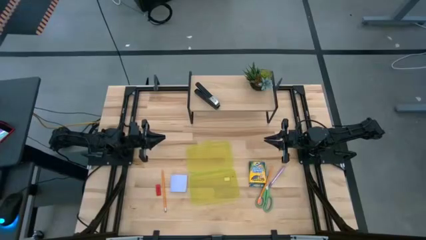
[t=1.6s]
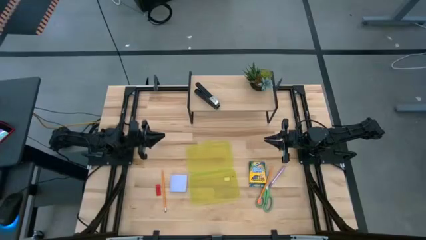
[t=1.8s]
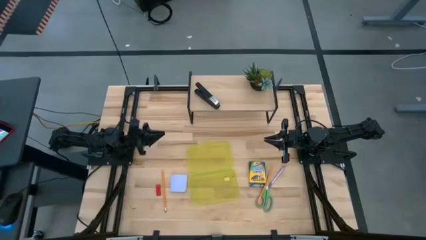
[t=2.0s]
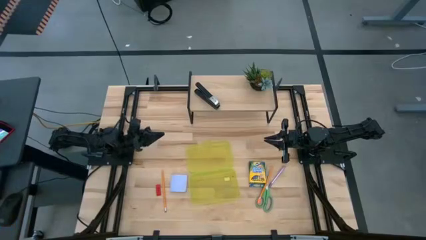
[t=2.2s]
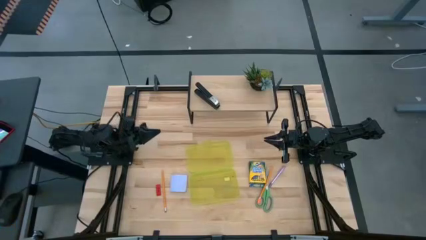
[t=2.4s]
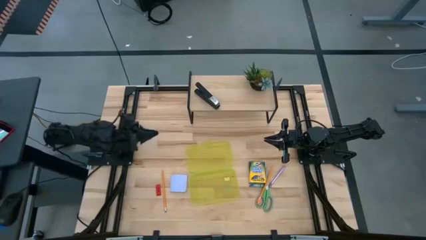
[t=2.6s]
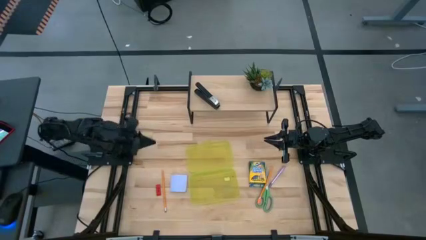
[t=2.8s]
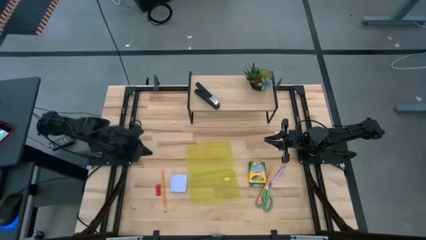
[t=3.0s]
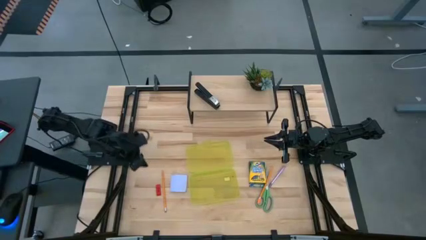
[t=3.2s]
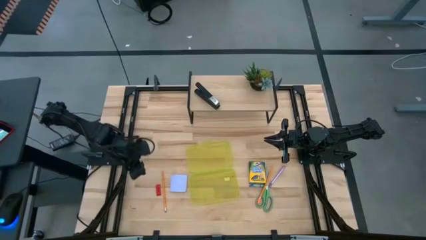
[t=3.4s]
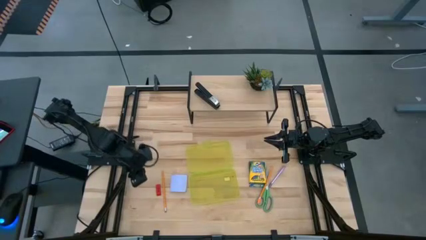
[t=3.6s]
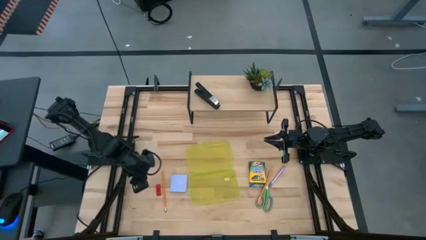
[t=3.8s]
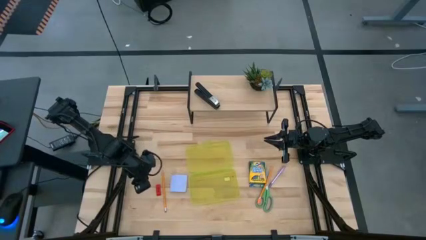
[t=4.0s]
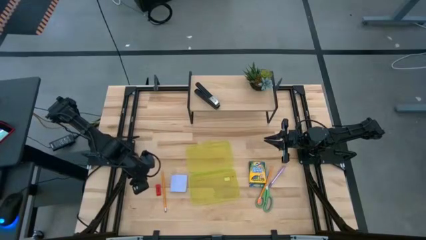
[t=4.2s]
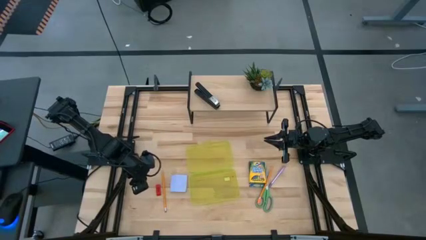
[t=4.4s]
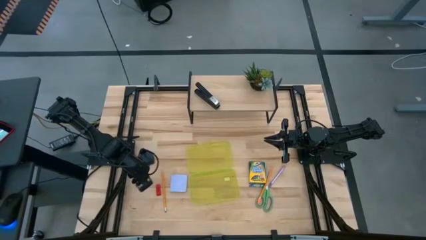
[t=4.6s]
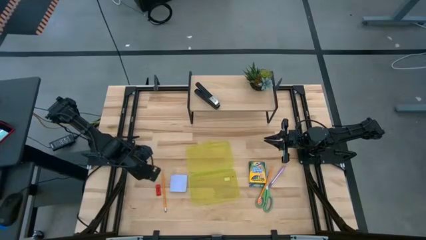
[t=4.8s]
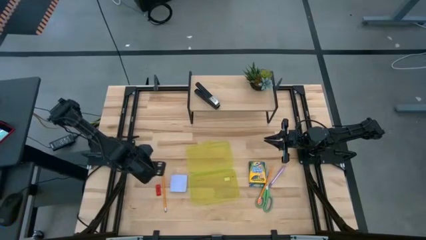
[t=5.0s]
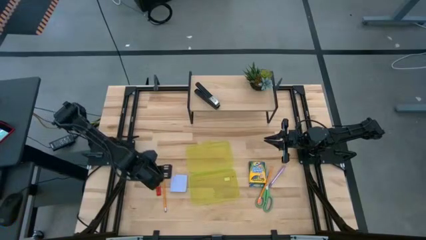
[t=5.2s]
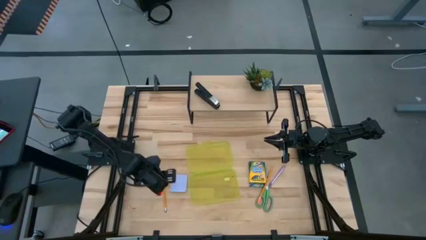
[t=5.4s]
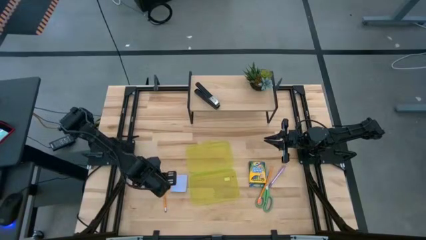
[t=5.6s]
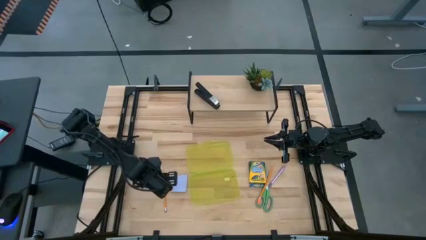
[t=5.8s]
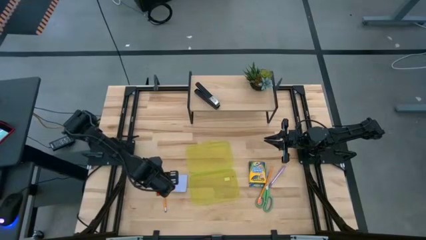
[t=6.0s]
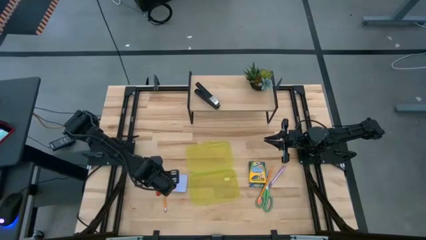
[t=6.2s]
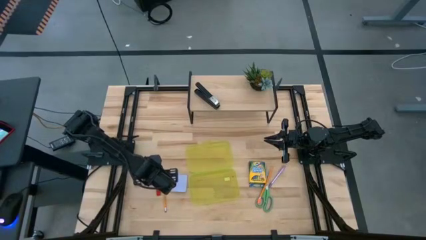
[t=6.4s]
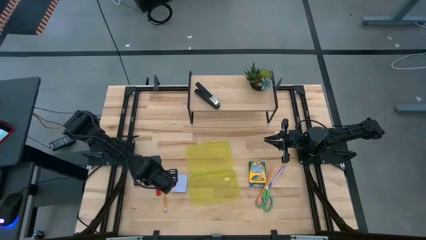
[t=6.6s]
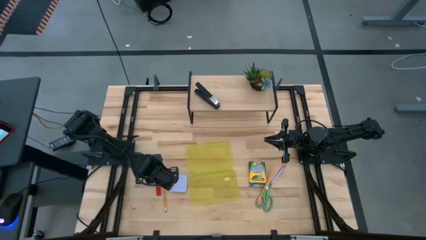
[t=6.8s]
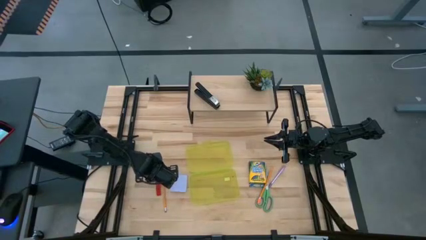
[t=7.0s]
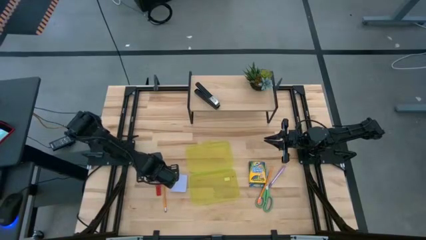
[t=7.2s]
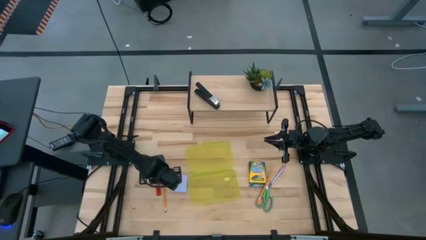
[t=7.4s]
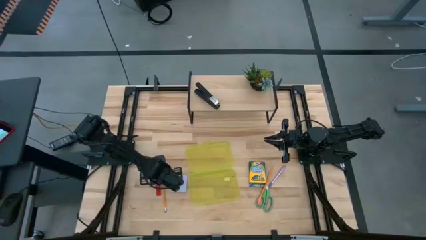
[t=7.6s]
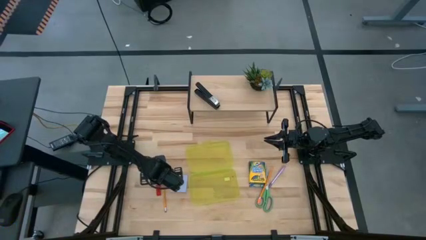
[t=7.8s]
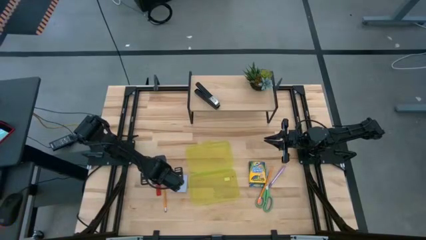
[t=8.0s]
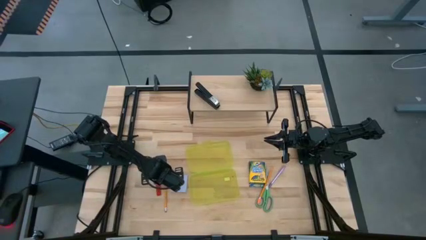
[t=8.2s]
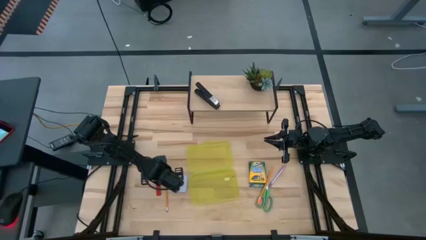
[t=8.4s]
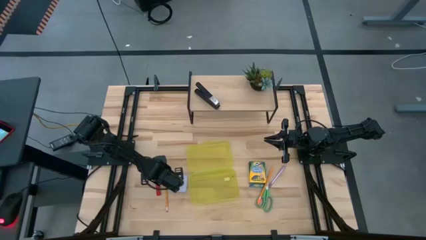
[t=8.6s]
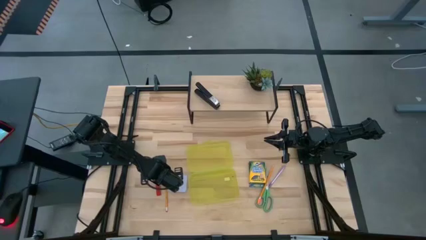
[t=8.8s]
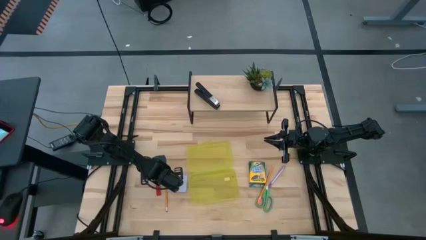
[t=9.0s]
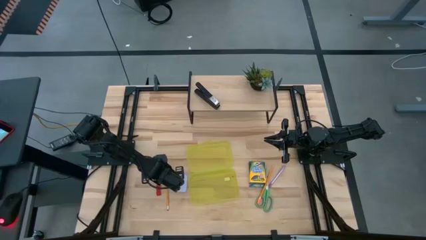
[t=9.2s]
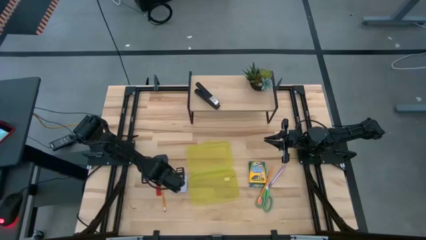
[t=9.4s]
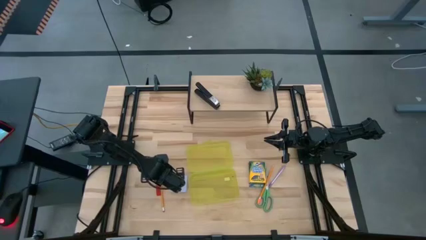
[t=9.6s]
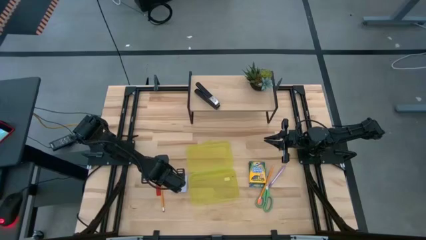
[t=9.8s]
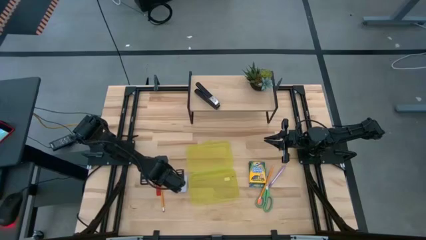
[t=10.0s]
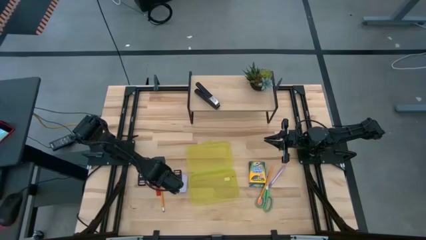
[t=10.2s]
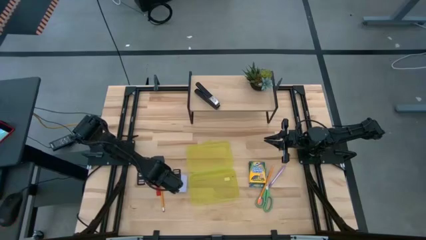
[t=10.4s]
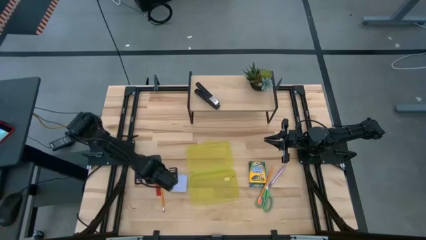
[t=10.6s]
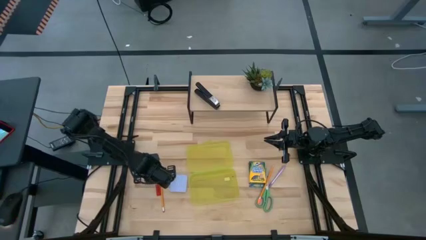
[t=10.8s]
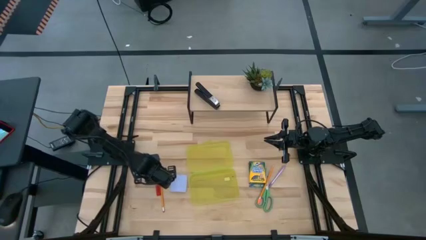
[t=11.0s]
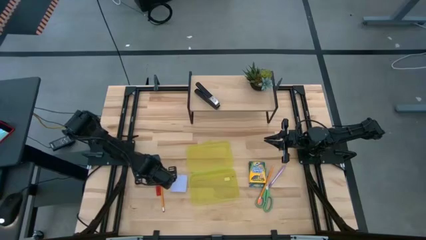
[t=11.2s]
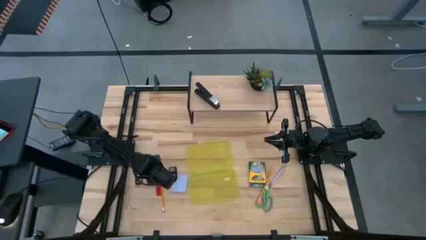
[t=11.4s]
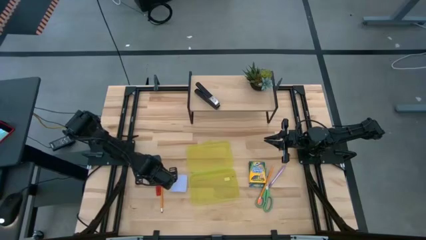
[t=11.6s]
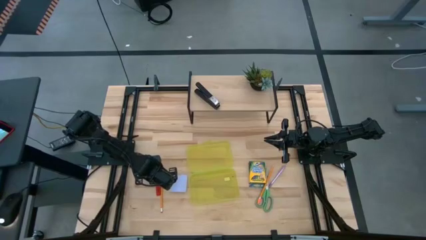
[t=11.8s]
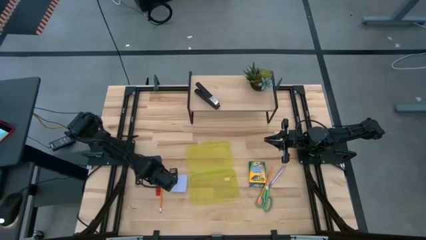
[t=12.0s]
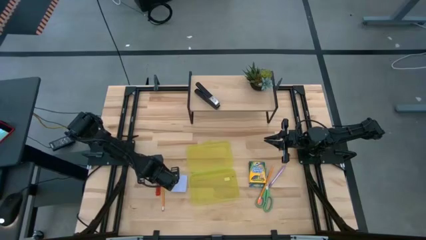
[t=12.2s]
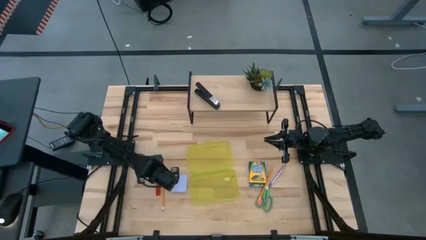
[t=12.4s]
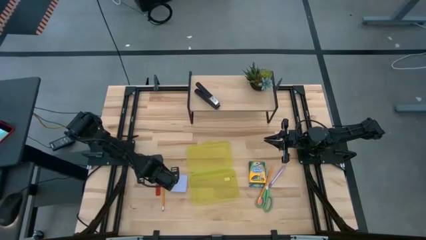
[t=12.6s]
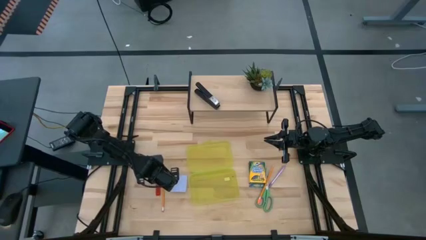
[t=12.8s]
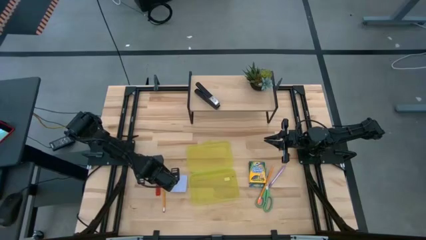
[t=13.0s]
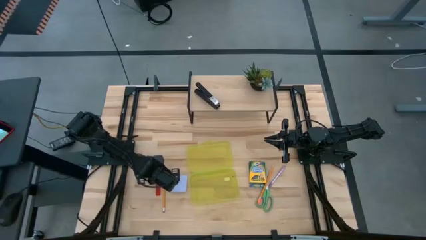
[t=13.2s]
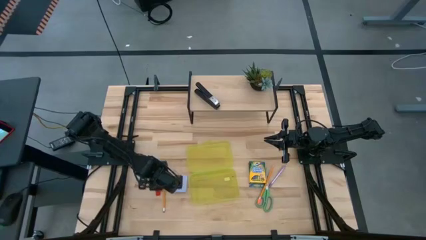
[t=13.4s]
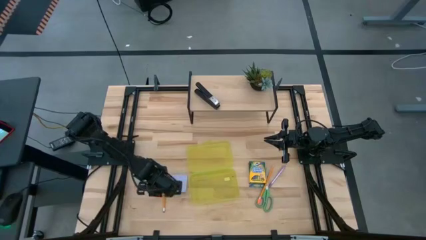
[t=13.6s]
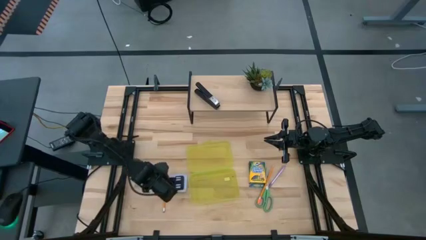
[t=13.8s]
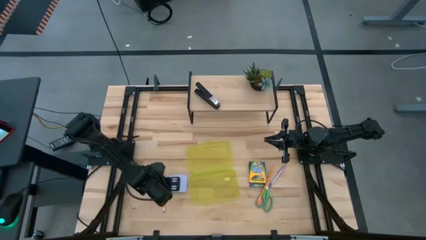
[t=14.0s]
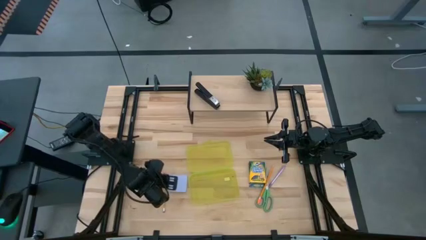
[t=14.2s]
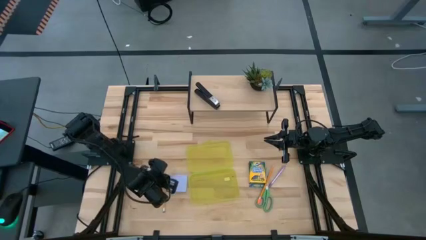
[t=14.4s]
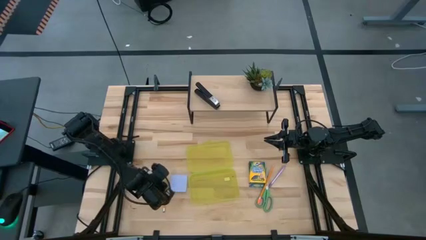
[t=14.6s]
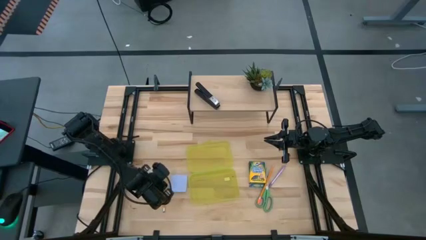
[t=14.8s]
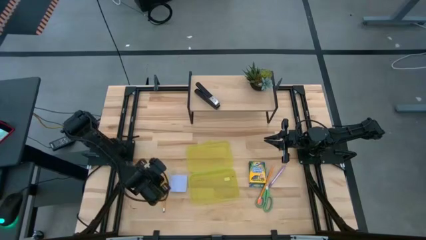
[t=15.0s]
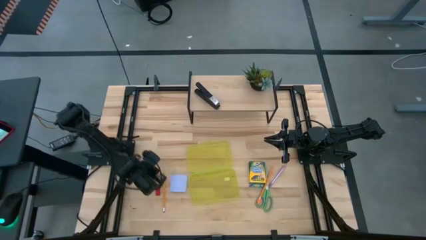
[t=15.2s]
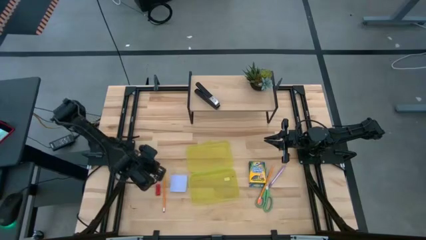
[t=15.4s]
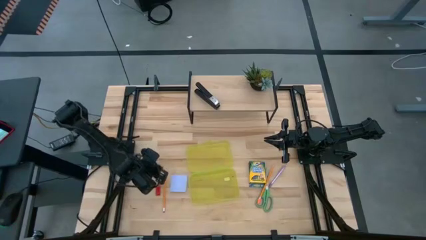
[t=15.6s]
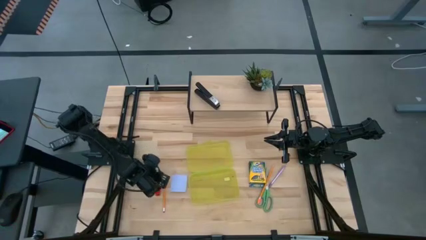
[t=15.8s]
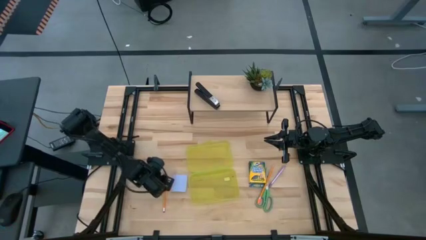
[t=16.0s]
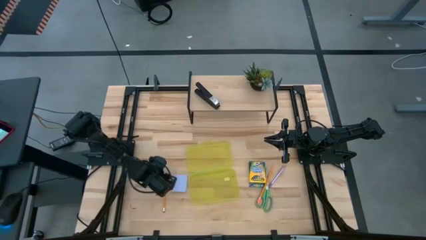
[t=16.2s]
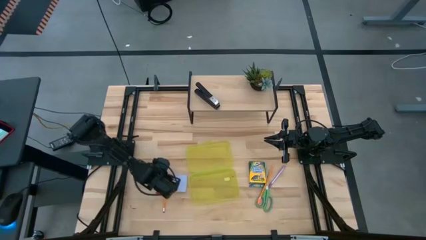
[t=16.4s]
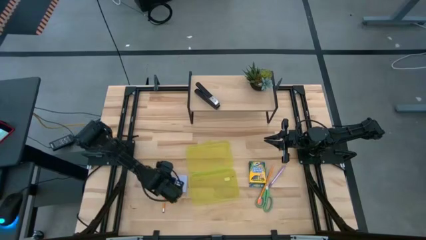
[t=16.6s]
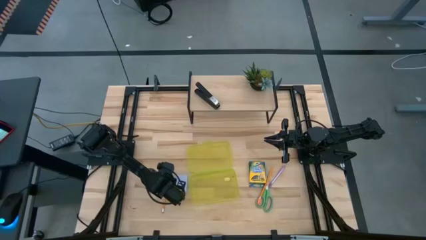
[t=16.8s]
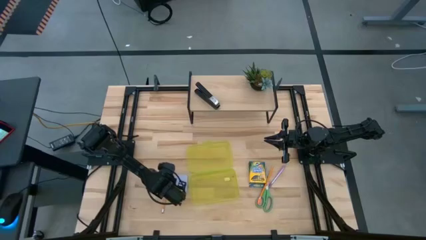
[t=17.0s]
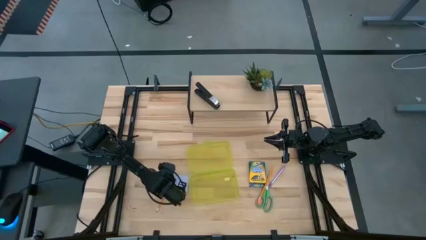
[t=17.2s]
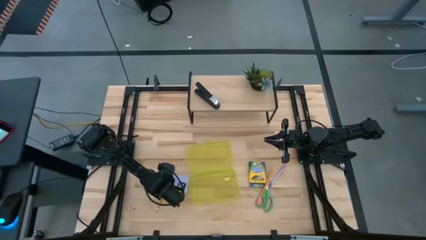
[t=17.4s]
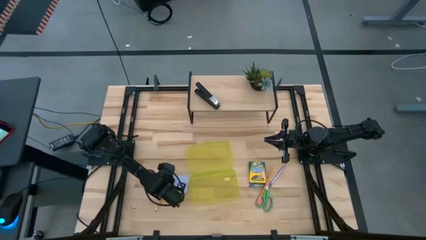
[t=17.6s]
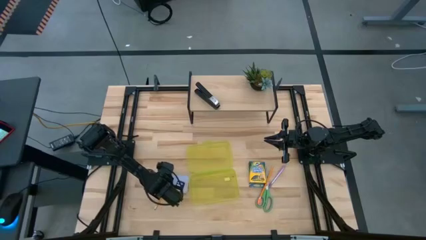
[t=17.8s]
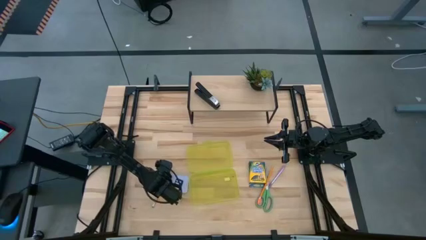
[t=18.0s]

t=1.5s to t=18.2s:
Task: Pack school essentials
Put the left orange pencil into the yellow supply box
